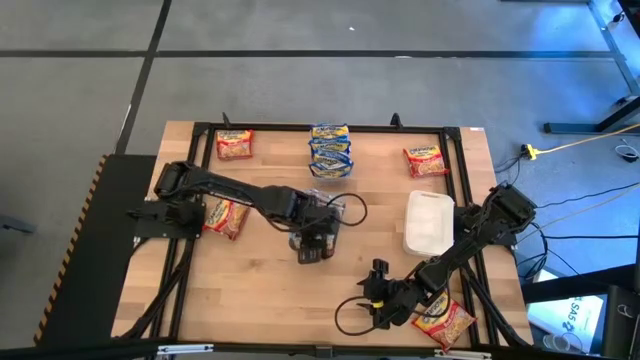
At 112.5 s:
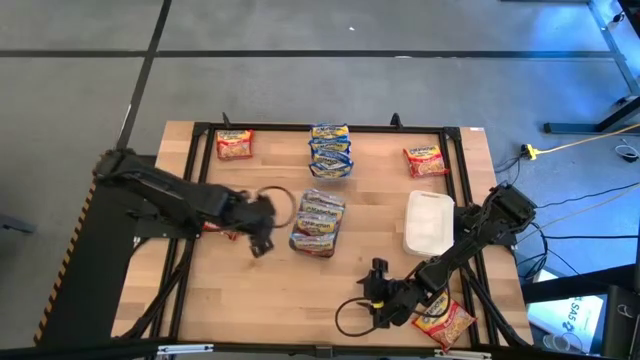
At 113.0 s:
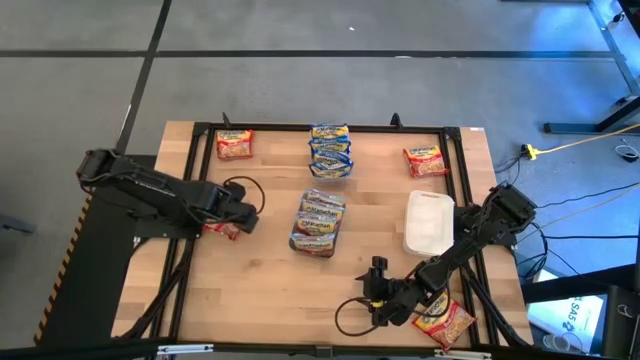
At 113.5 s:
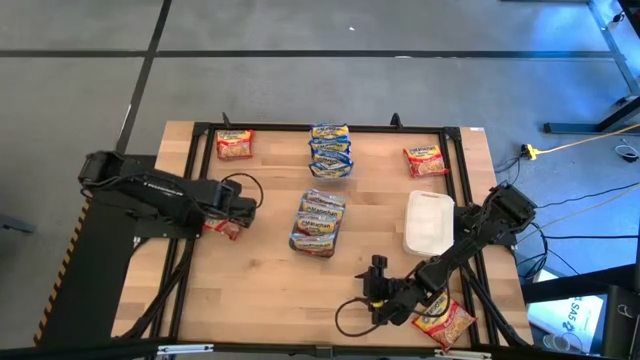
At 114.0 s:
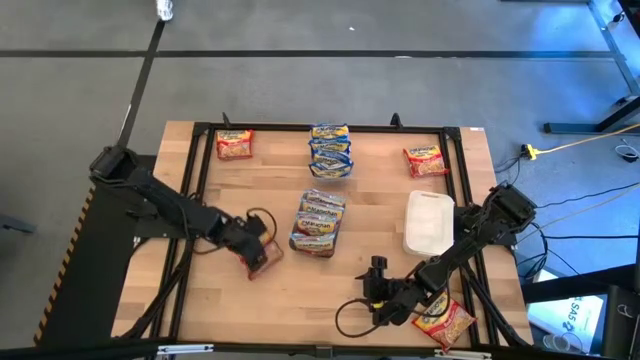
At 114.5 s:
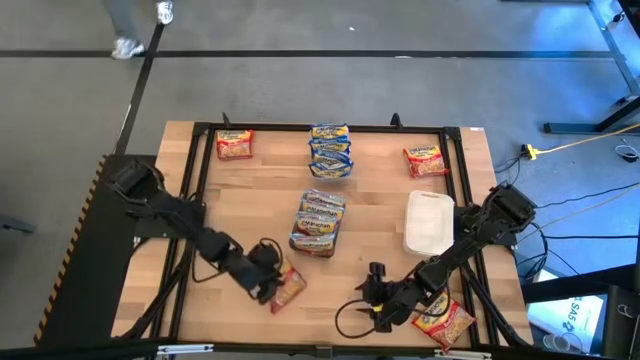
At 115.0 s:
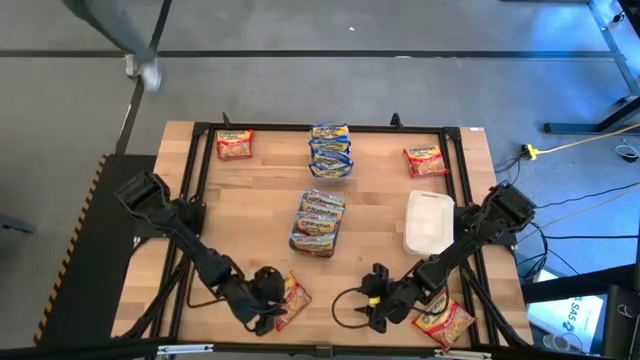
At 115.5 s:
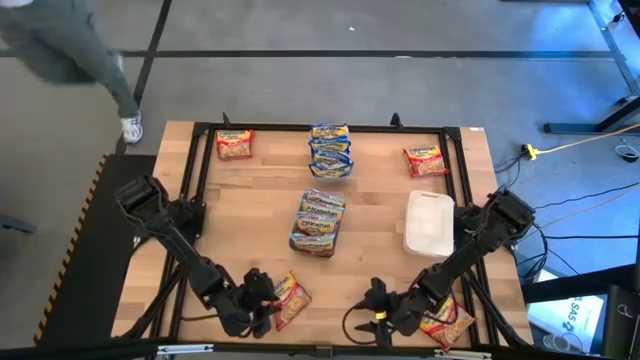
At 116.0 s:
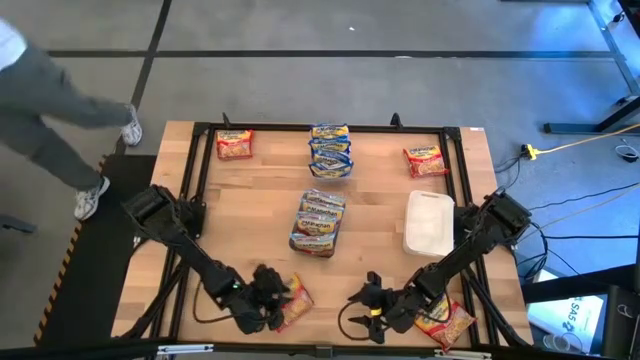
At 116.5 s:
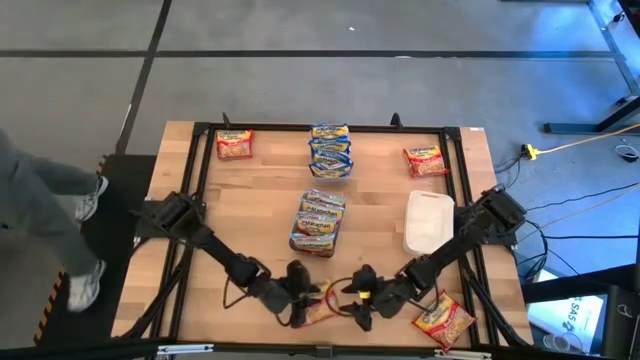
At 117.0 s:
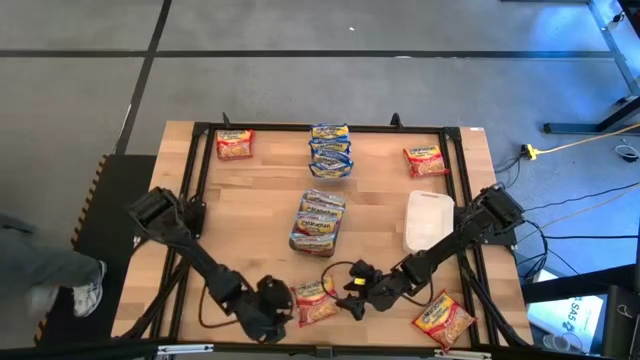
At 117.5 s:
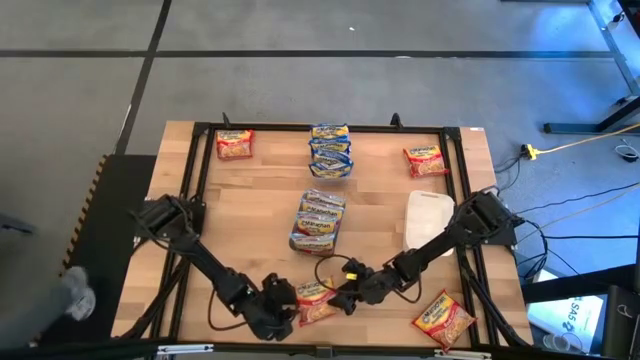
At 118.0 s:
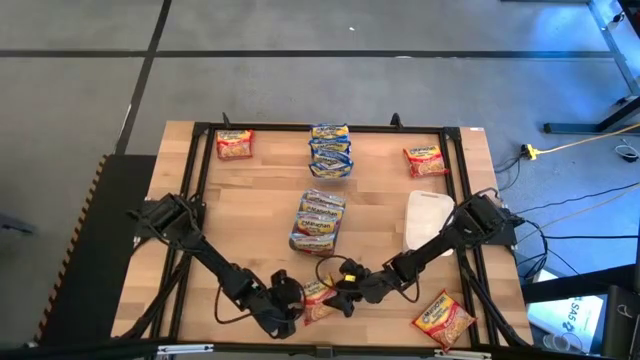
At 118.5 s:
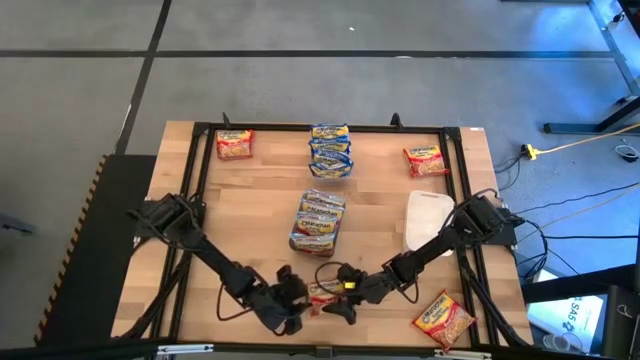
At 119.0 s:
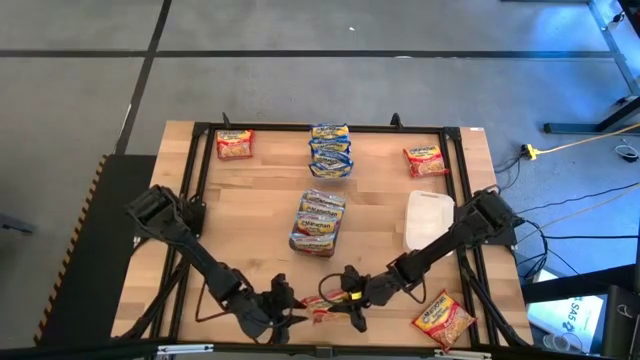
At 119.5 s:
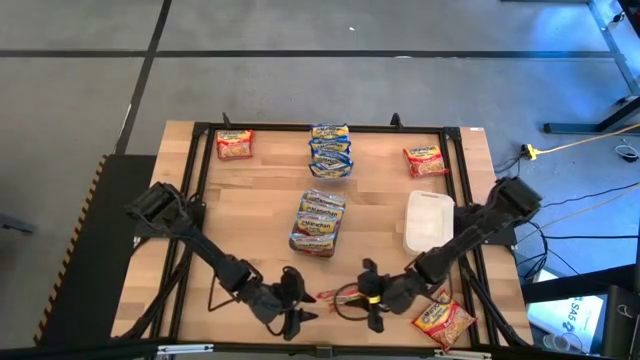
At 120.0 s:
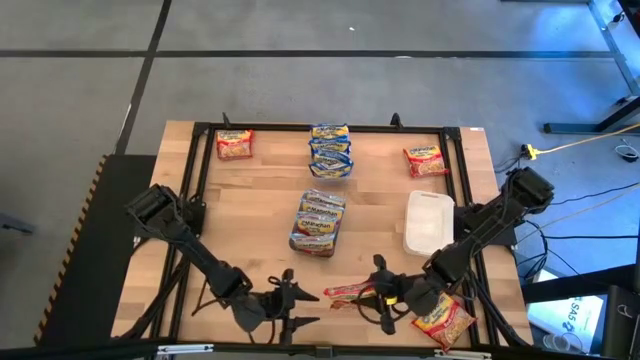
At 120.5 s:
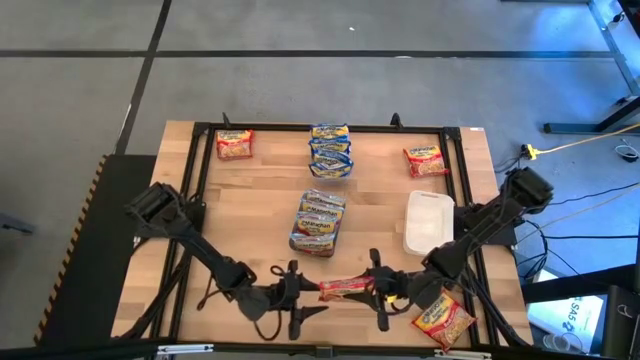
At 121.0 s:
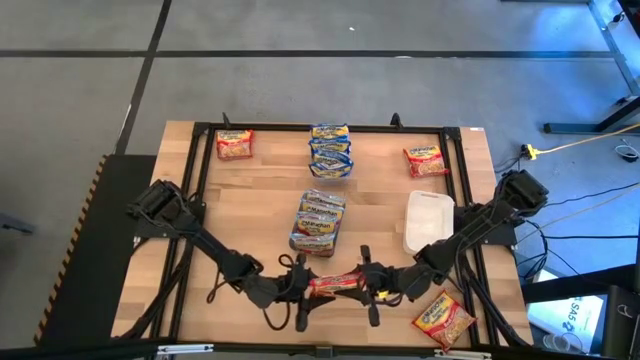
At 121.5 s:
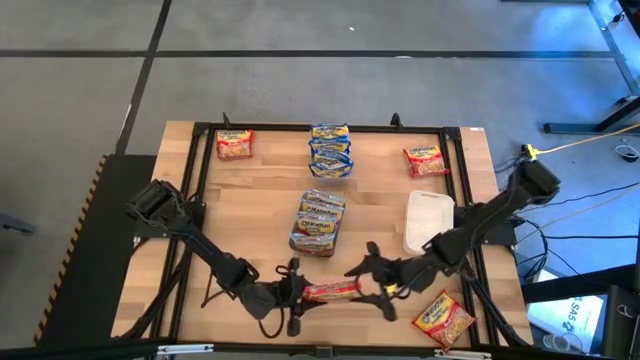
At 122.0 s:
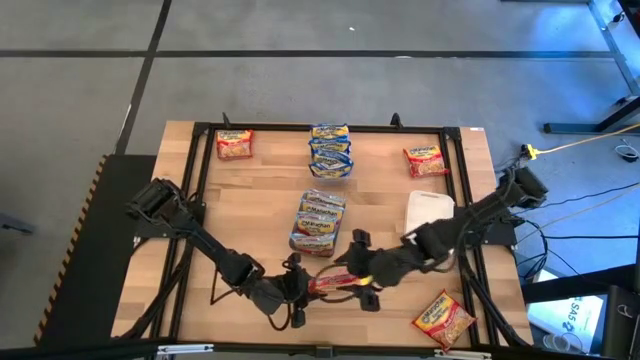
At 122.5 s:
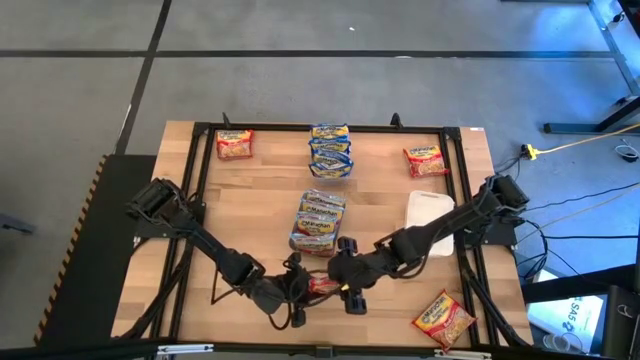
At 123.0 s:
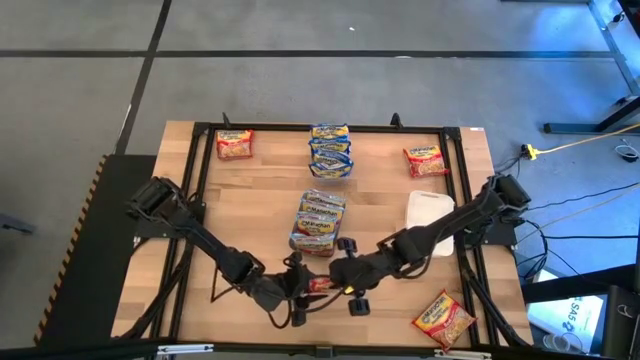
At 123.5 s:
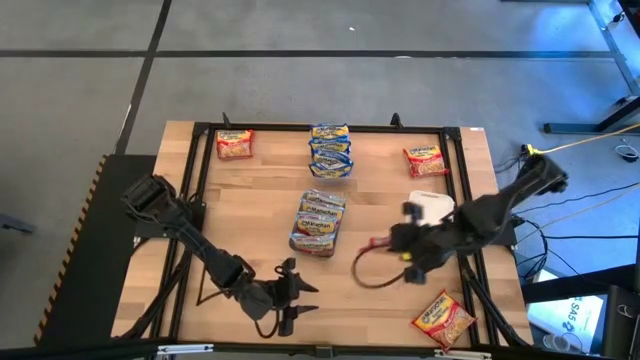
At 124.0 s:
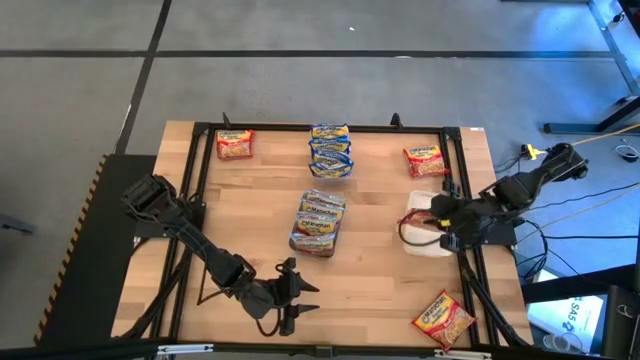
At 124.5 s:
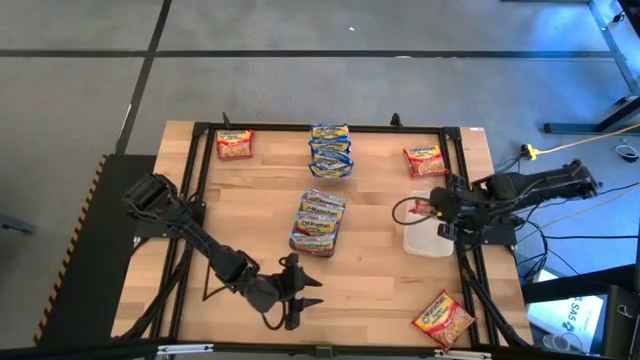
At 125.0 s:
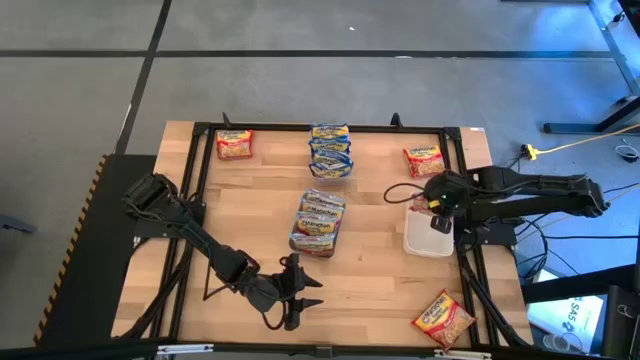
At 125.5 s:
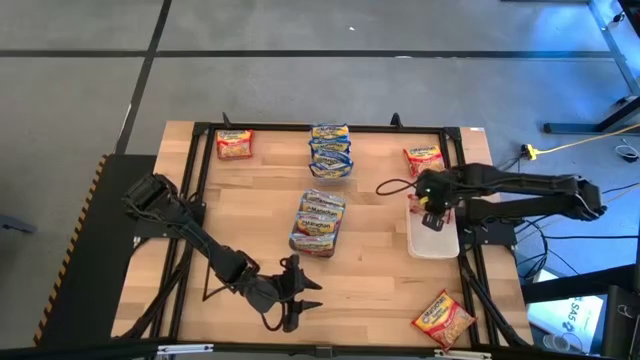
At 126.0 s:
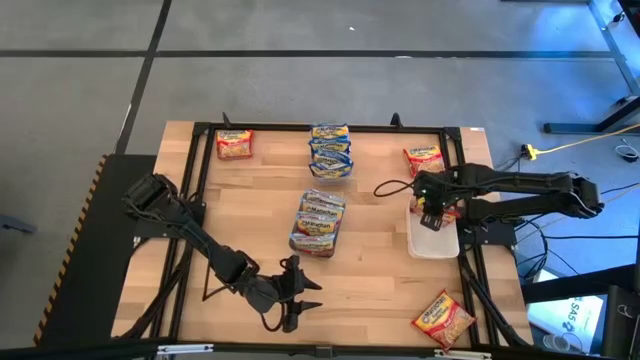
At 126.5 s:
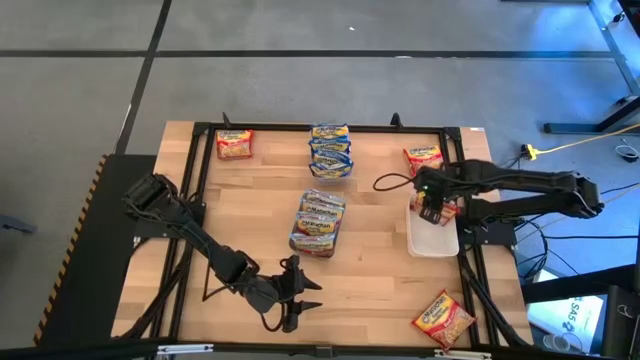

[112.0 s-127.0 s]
Task: Sort Maruchan noodles
Put the red noodle pack into the white bin

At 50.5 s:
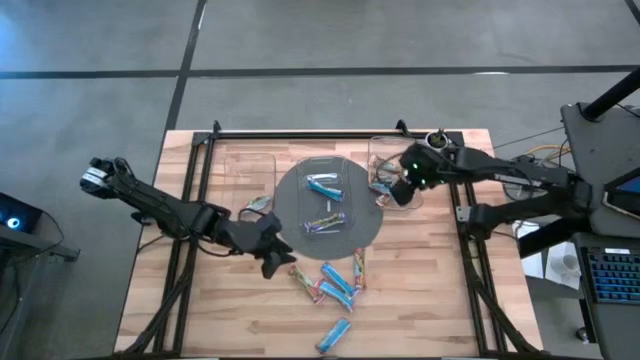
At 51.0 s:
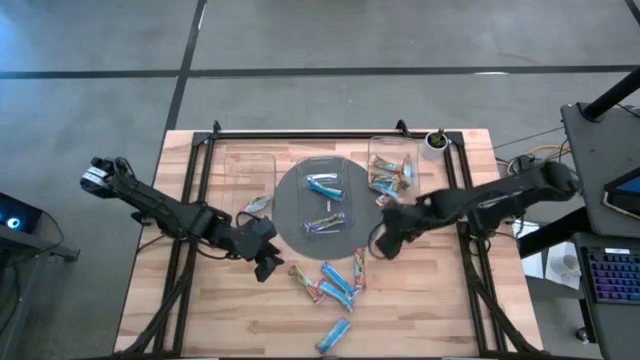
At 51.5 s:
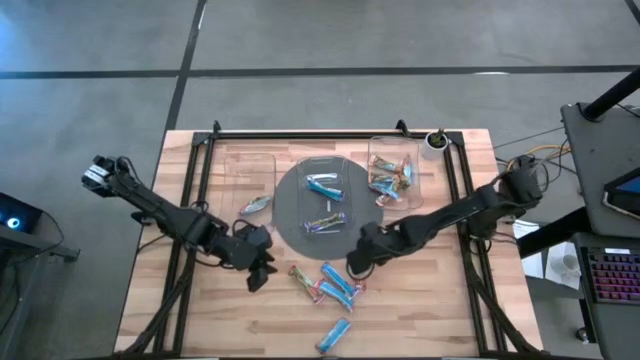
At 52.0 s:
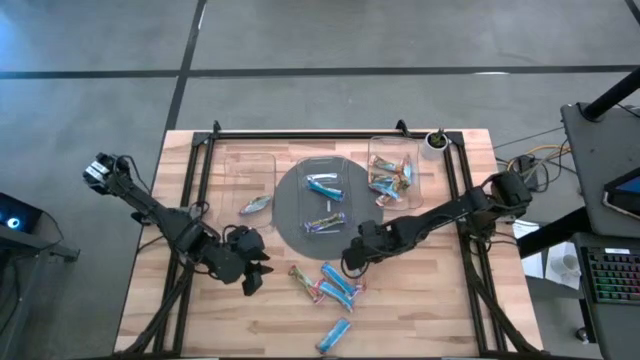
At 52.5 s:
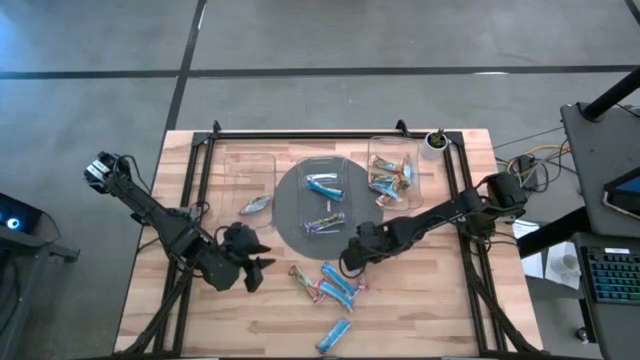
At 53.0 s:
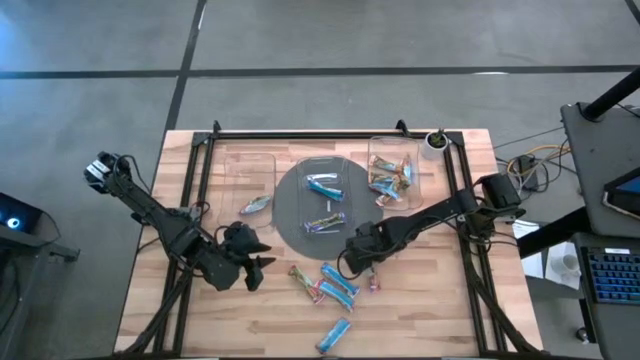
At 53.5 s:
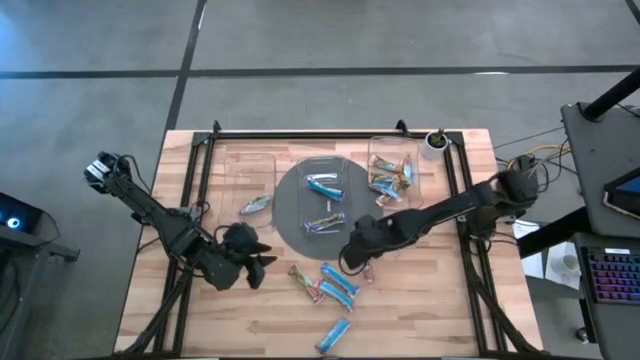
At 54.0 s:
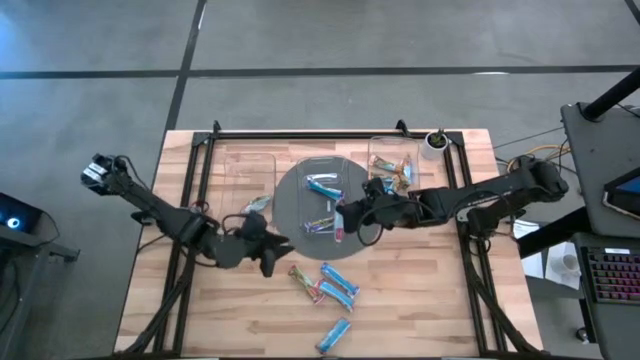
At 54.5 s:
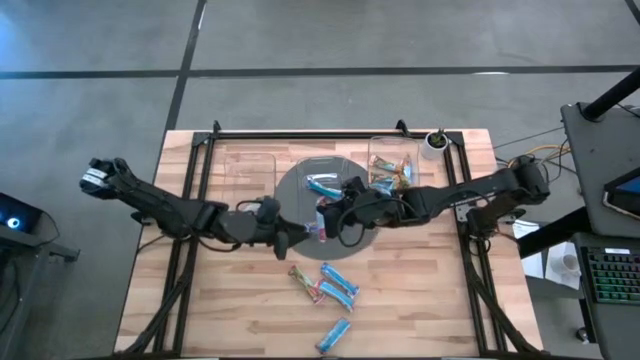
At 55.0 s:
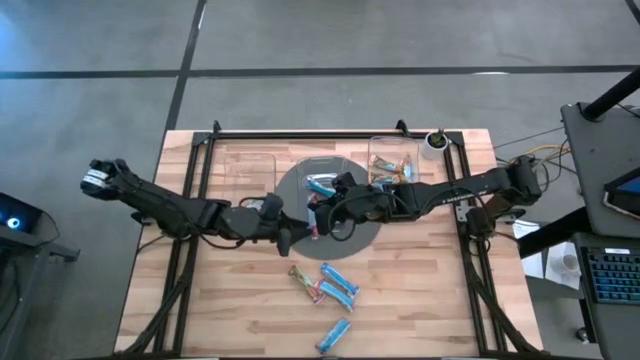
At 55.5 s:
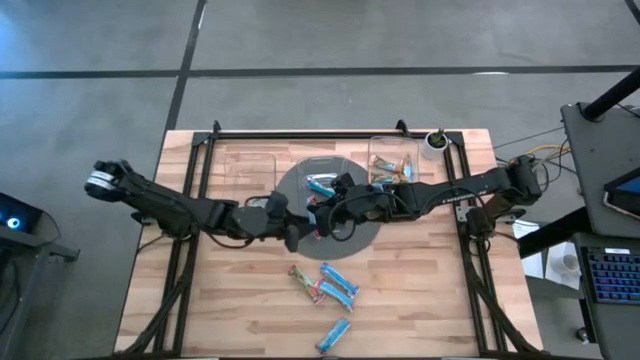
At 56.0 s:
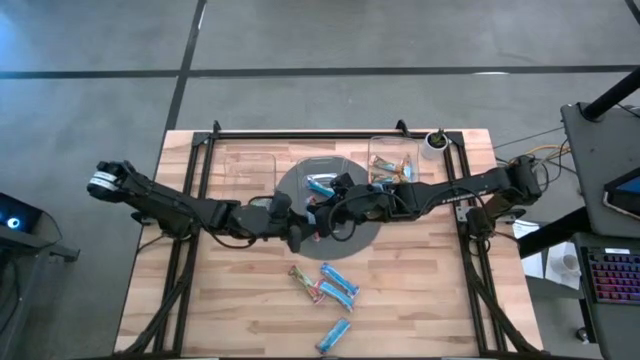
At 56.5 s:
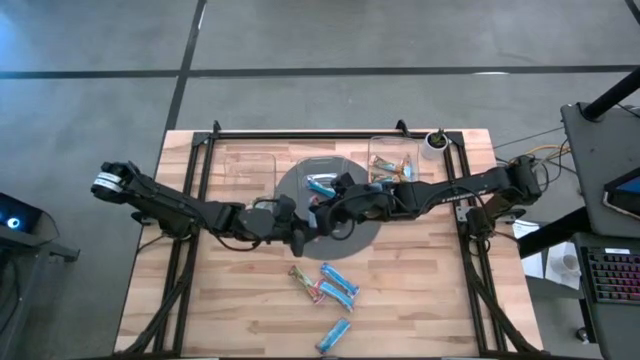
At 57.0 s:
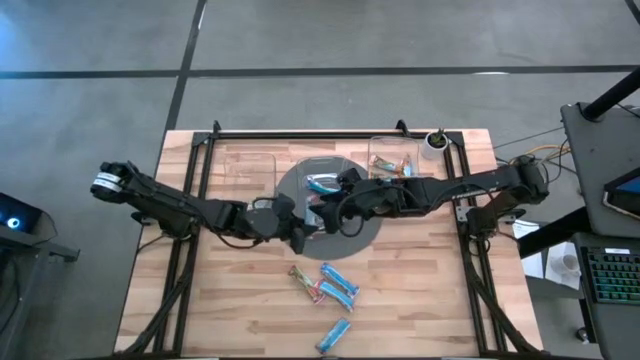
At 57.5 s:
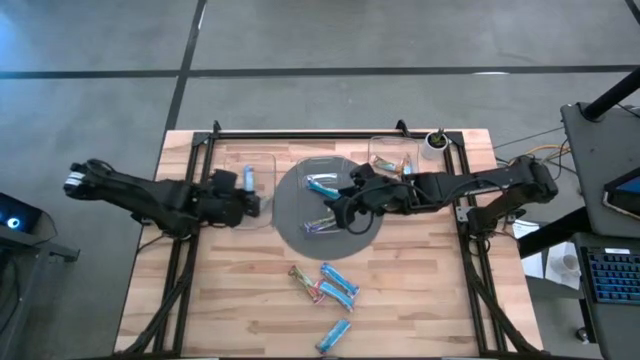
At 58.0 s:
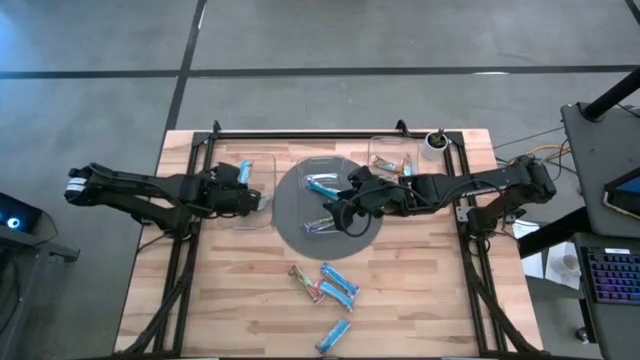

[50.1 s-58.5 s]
Task: Pick and place Granola Bars by type
Put the red granola bar into the left transparent bin
